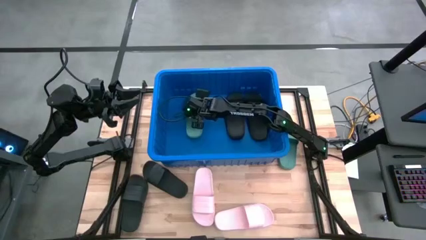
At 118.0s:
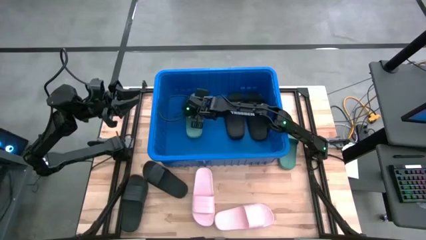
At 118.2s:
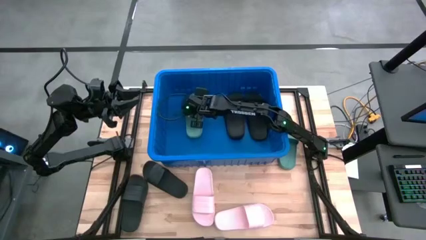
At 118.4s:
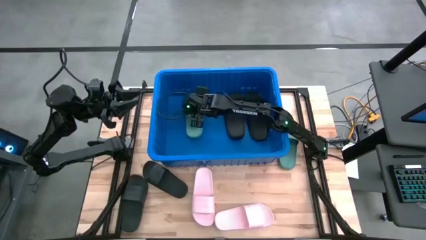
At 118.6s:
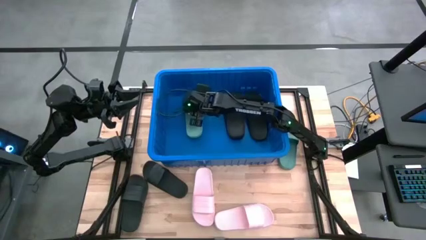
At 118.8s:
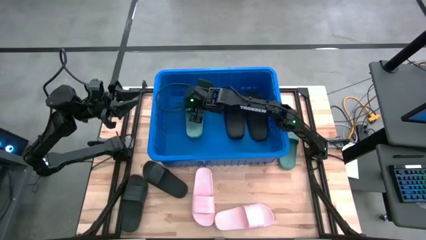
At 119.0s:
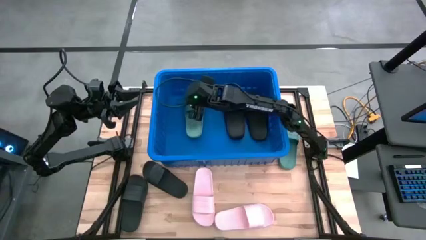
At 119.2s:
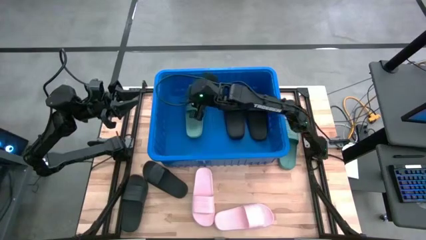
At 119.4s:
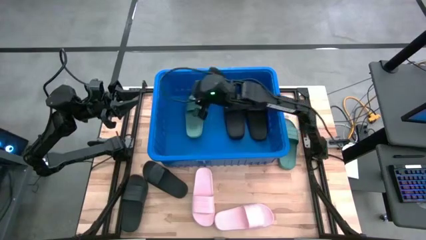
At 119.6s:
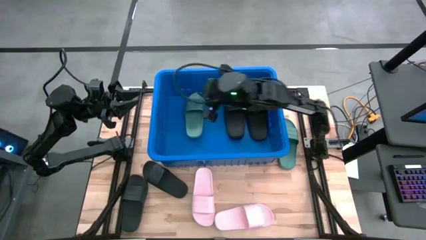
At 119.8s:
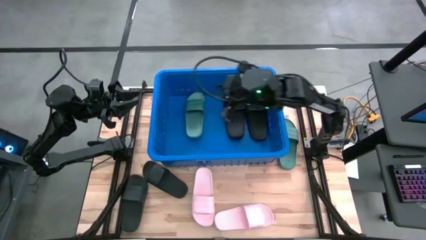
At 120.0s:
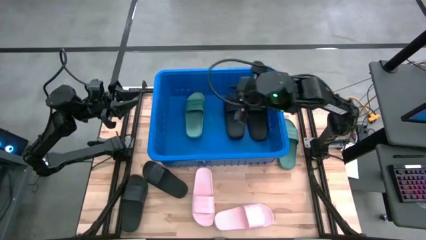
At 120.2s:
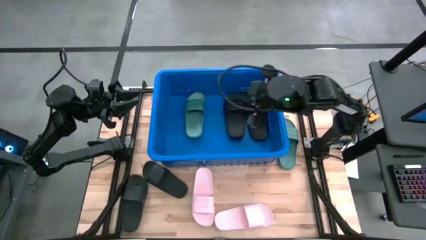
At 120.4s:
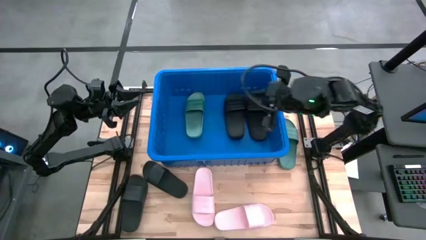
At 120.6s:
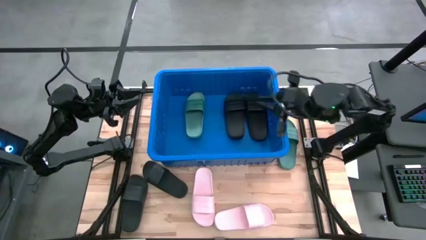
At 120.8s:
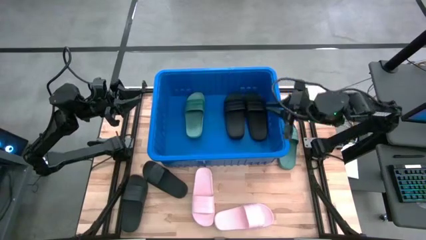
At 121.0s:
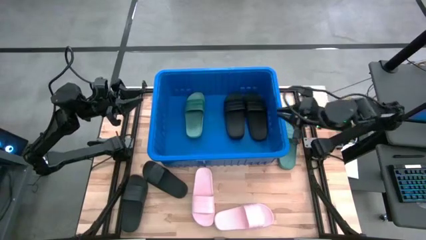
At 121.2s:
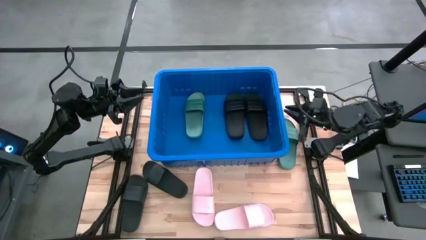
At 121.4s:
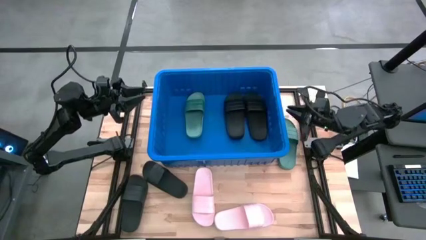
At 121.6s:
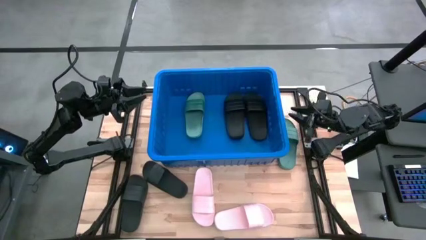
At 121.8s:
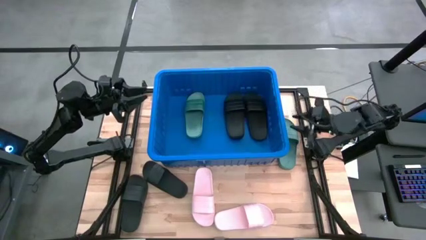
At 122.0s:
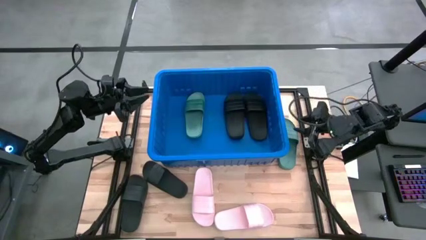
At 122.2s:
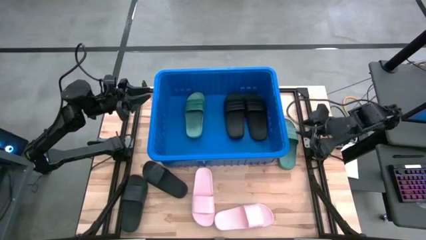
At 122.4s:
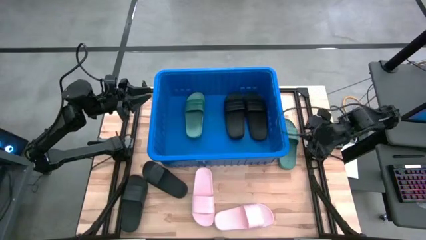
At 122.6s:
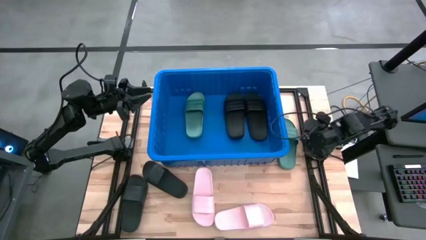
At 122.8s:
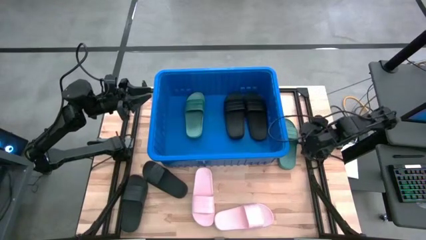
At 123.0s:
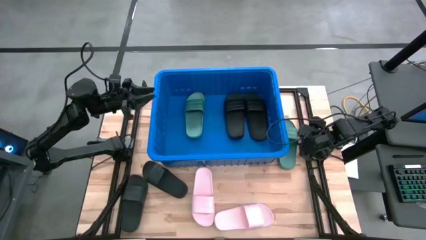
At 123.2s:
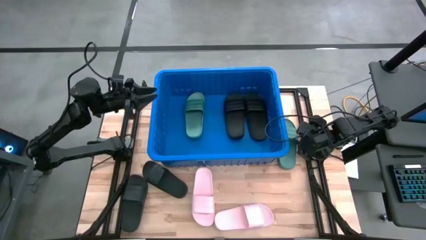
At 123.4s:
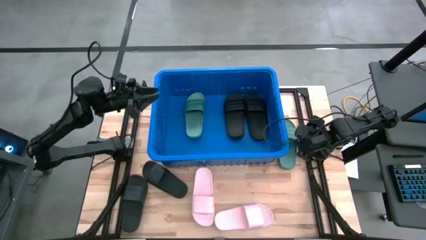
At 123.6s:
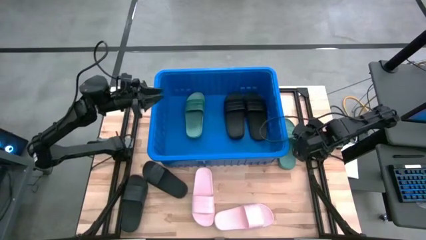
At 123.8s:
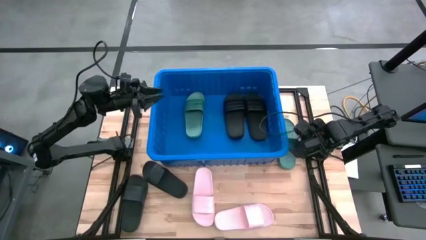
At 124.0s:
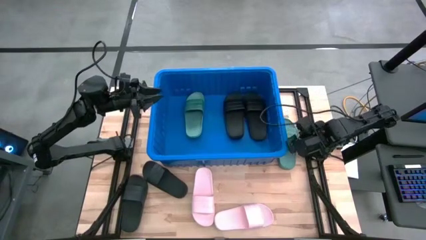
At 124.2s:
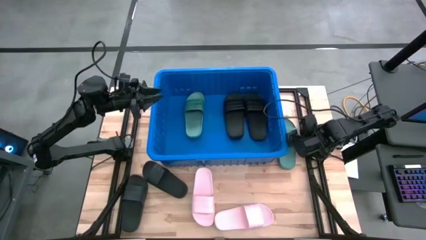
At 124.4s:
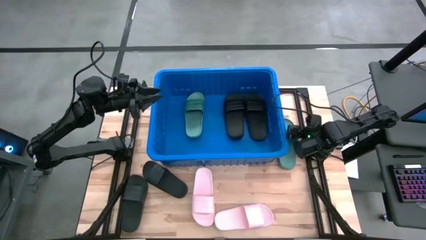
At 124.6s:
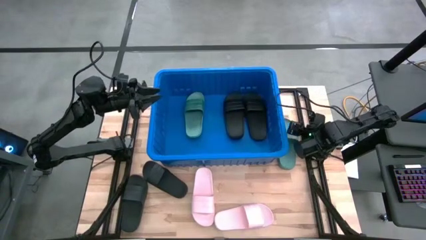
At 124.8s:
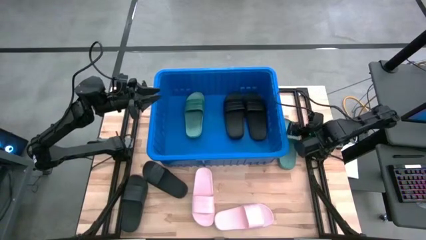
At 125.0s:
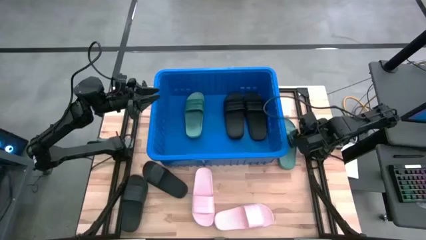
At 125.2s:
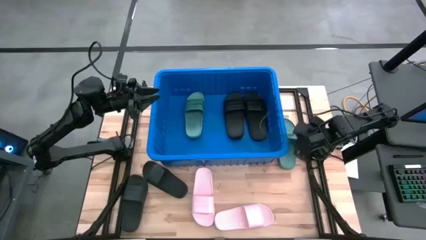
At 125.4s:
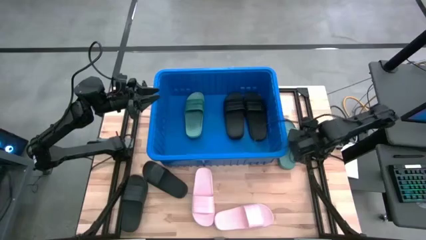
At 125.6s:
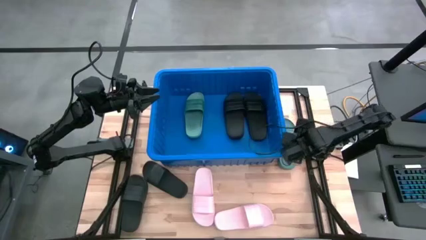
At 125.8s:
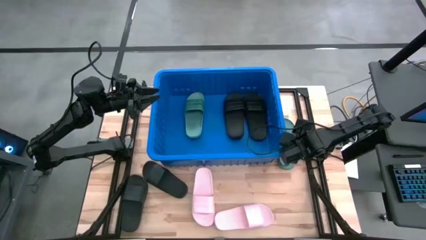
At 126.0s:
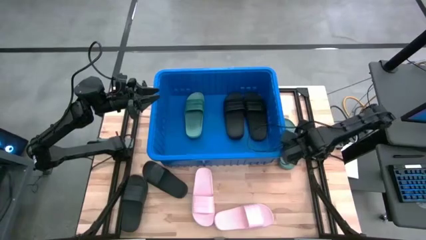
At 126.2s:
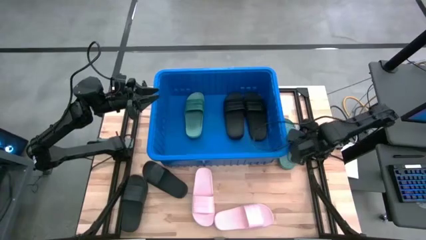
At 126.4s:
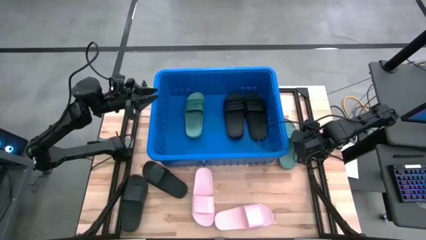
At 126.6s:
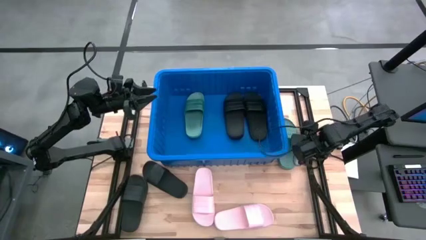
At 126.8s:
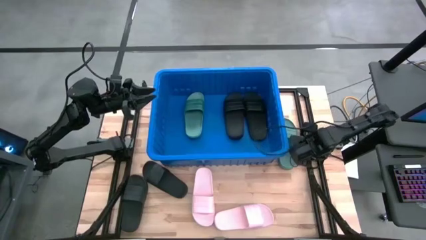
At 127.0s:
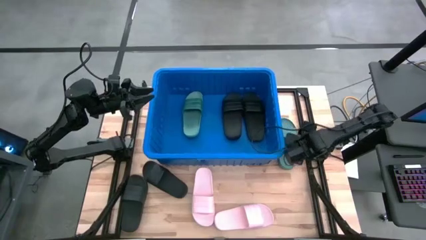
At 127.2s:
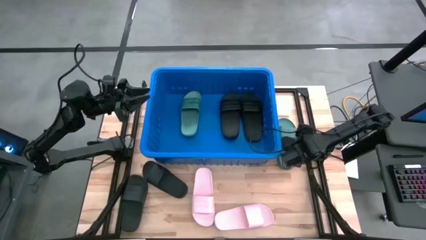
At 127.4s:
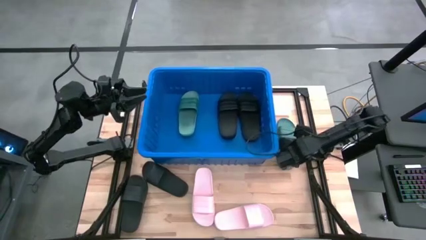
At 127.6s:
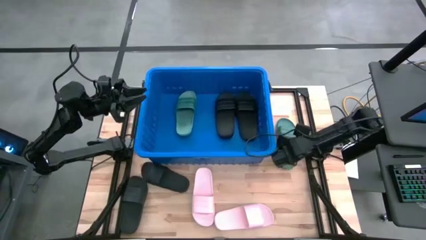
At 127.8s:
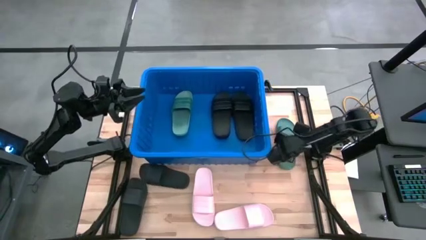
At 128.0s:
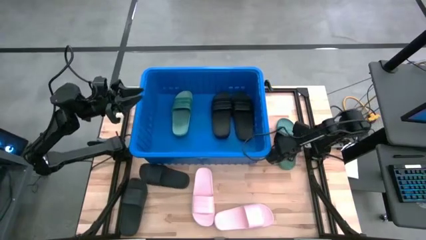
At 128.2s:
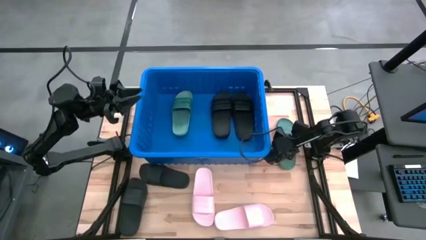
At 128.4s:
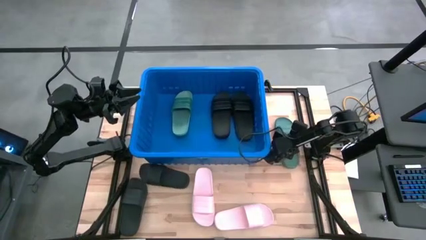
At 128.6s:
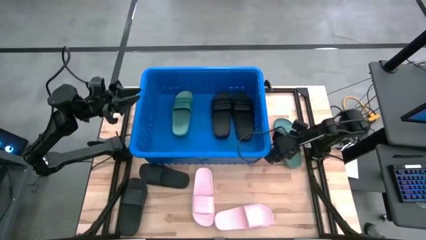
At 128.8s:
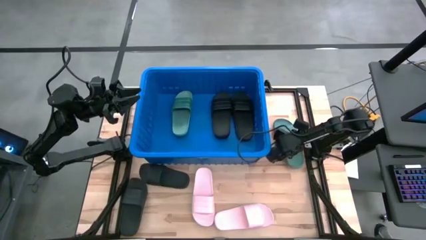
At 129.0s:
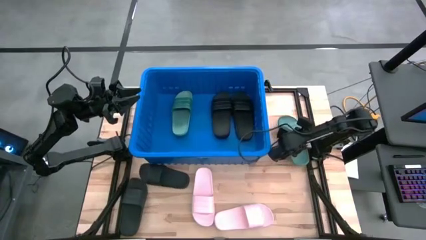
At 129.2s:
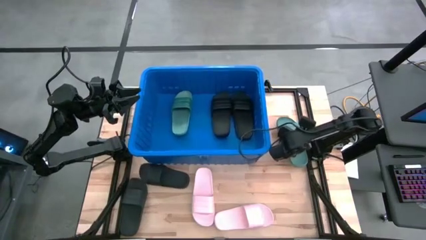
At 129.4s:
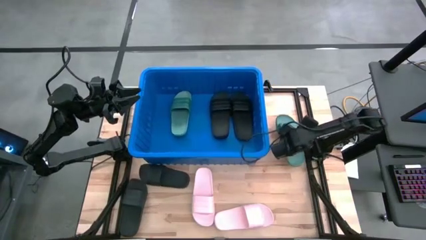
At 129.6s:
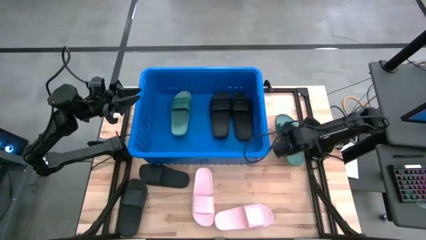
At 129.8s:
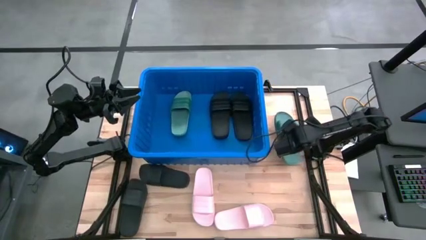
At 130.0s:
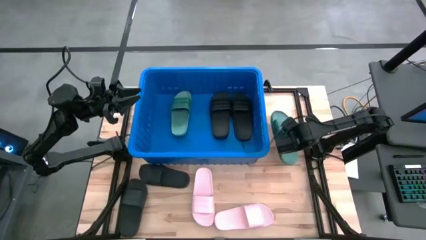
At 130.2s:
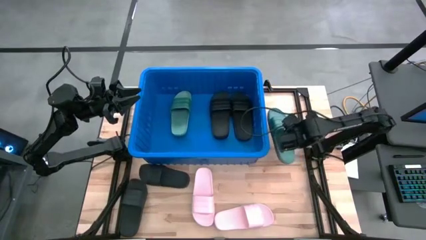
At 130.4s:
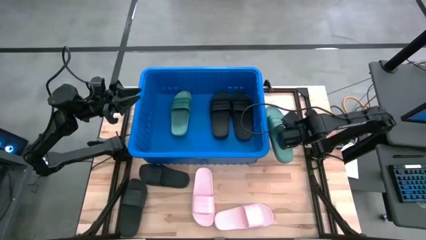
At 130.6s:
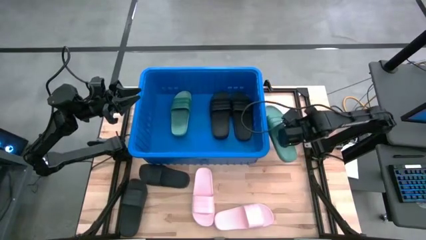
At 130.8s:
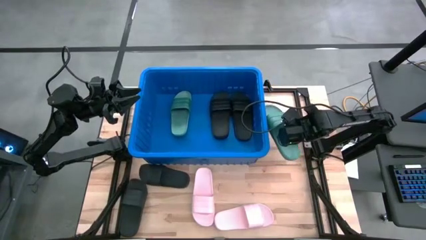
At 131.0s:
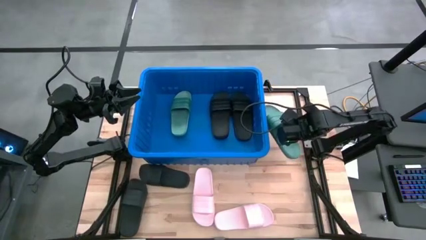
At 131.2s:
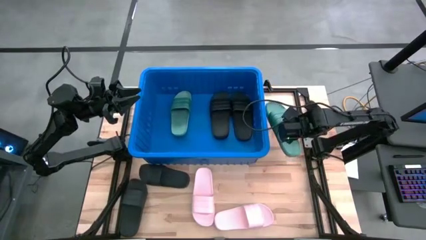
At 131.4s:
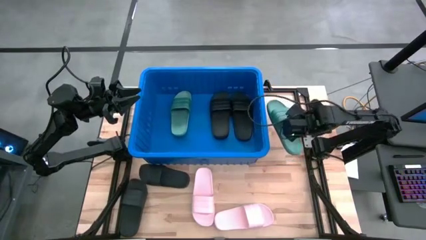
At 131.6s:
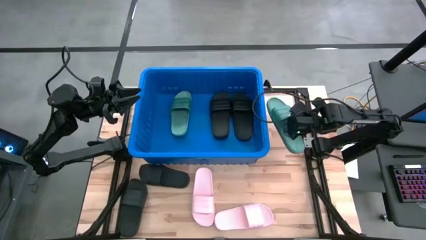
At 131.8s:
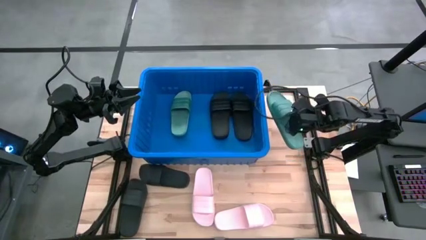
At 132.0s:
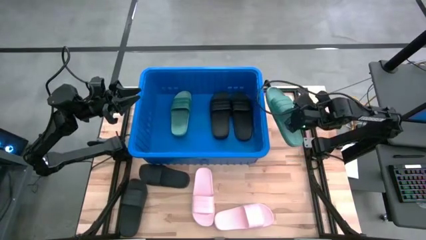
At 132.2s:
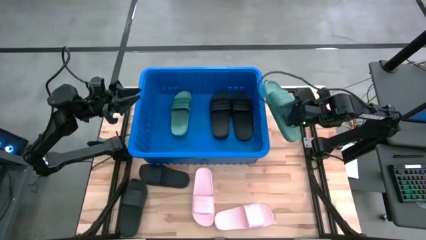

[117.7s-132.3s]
Task: Pick and place slides into bin
Put the green slide into the blue bin

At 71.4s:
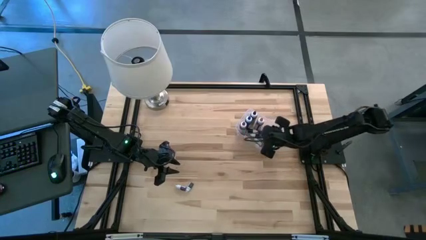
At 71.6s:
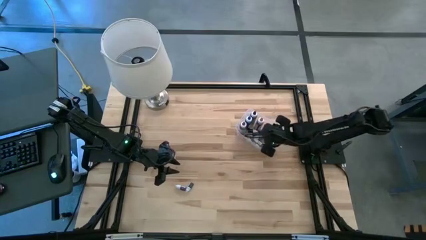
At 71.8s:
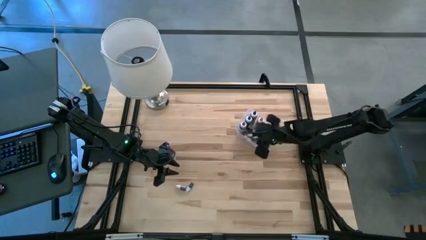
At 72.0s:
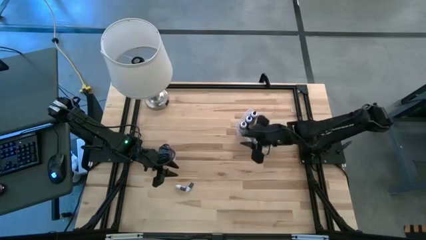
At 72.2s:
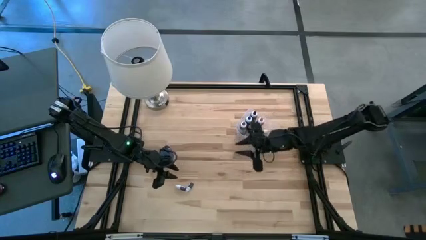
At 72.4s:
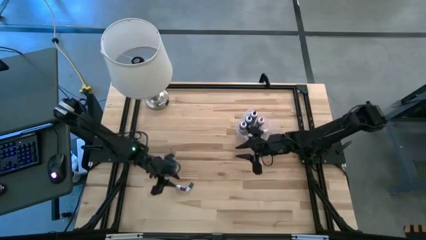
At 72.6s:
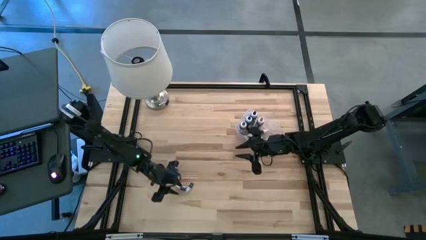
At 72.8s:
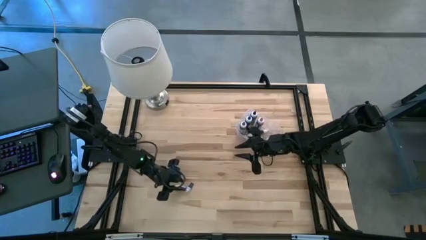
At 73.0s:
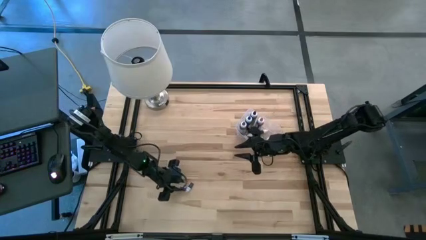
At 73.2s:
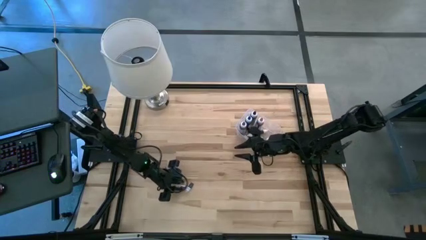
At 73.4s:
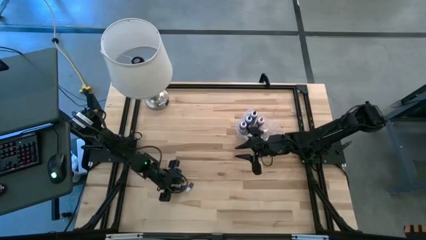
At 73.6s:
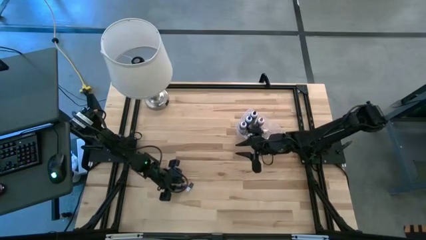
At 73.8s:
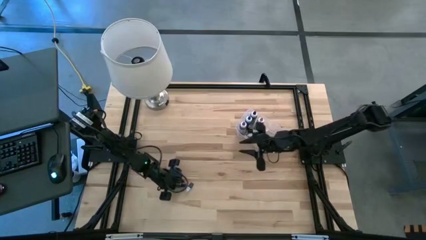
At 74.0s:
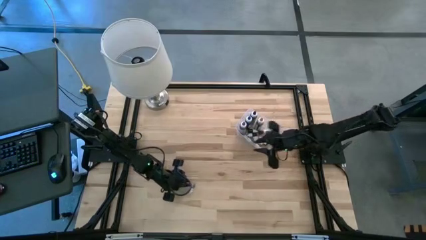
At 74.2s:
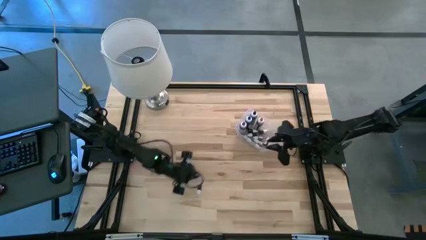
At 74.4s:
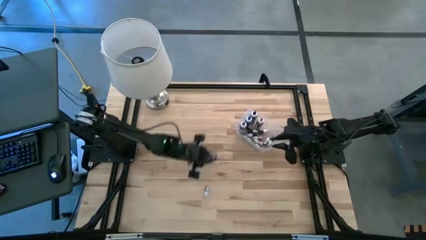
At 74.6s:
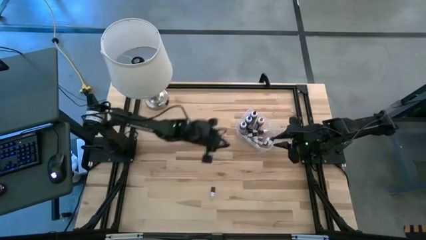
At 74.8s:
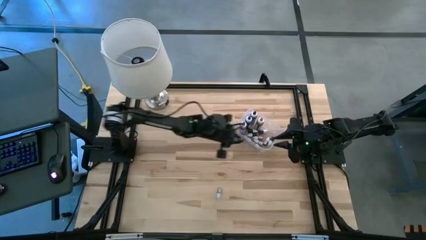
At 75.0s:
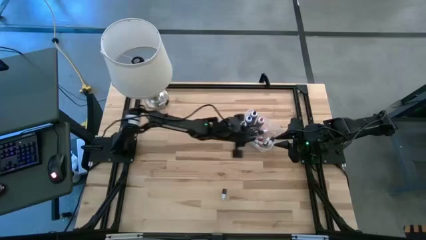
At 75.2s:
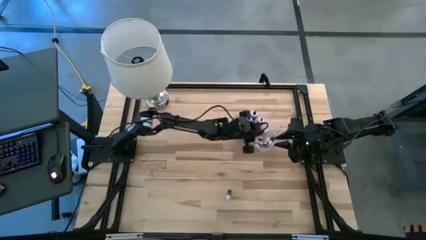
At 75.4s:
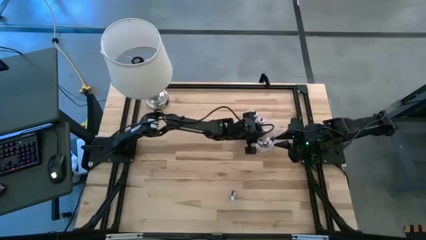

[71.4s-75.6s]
Task: Pick & Place food coloring
Put the small violet food coloring bottle into the transparent bin
